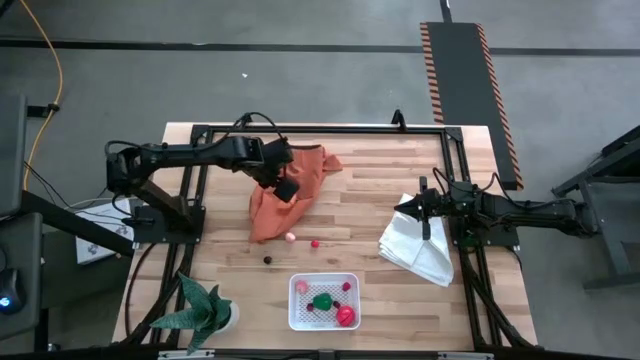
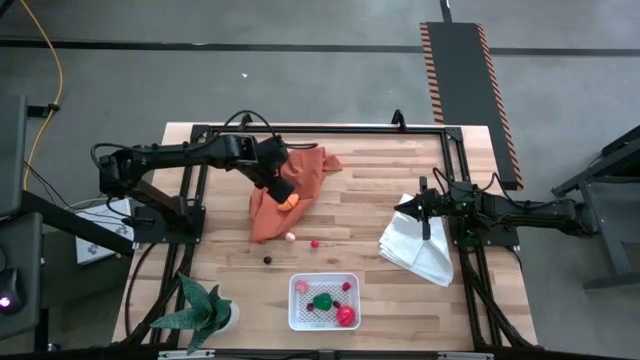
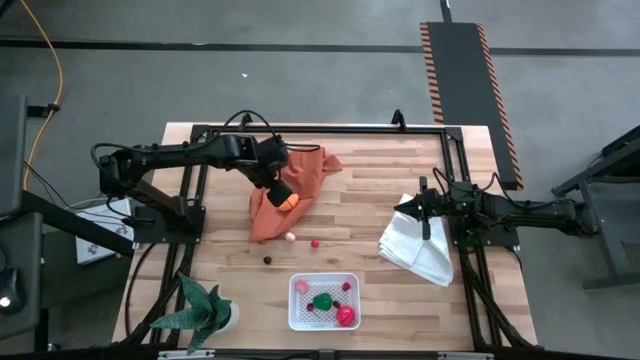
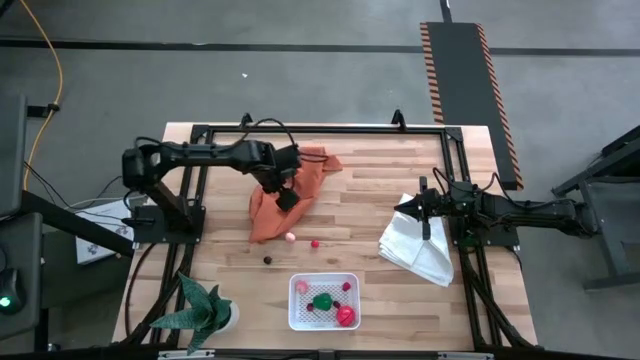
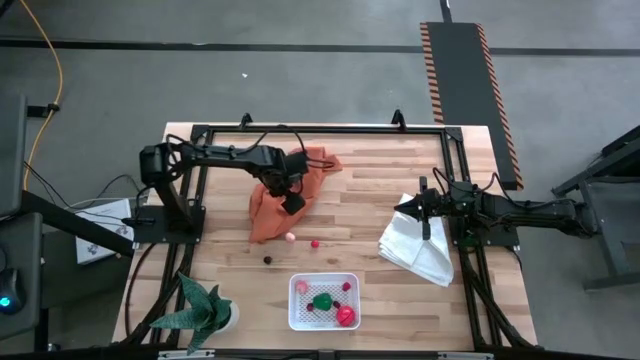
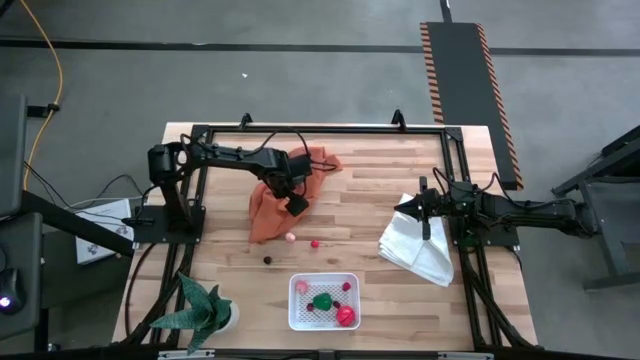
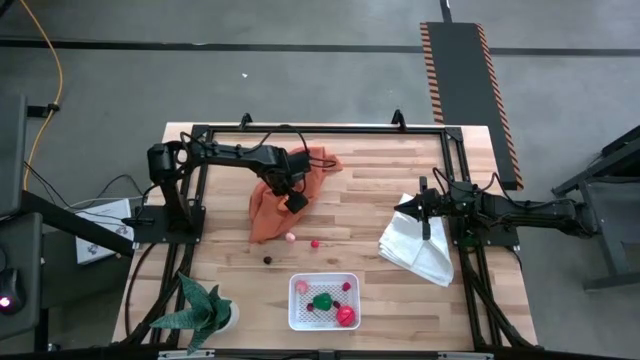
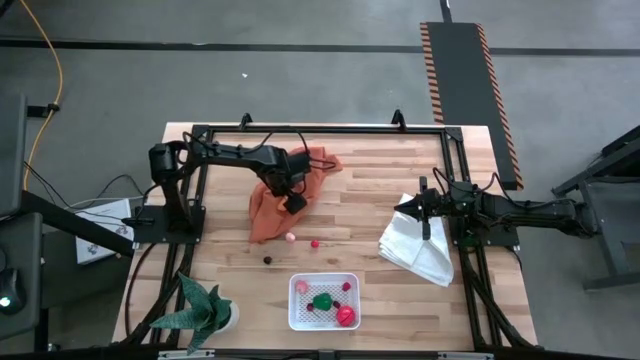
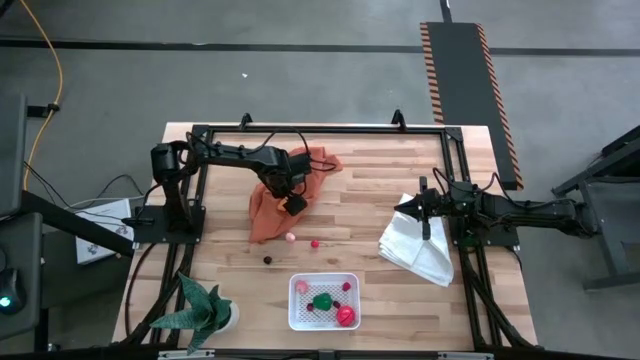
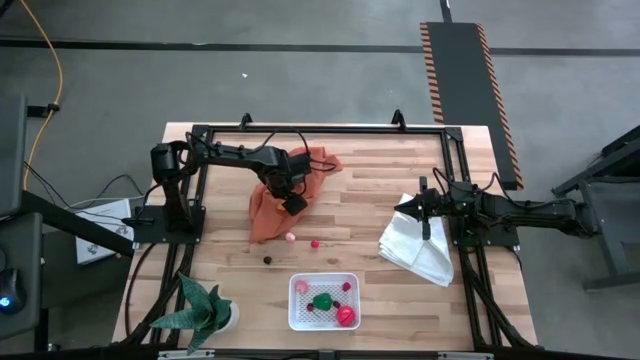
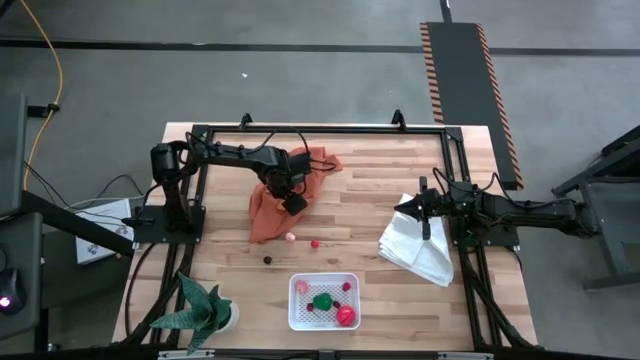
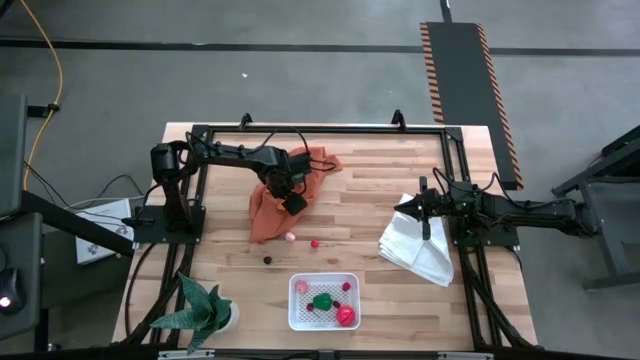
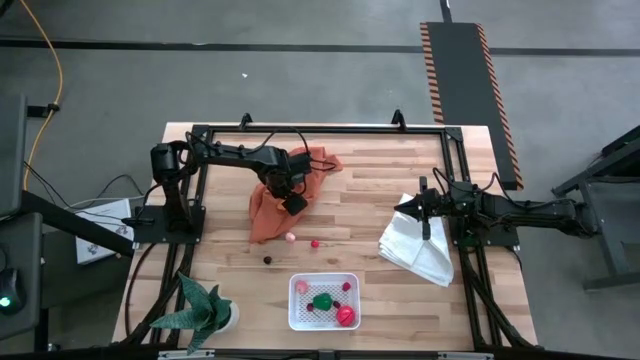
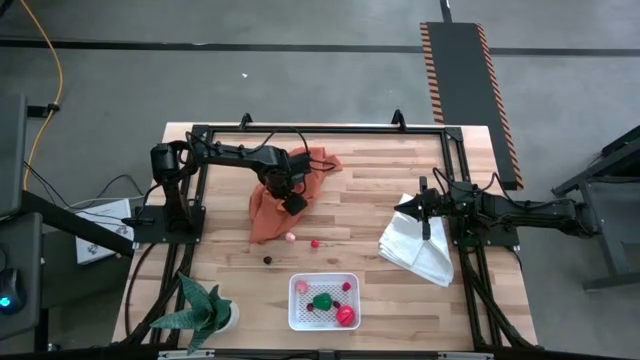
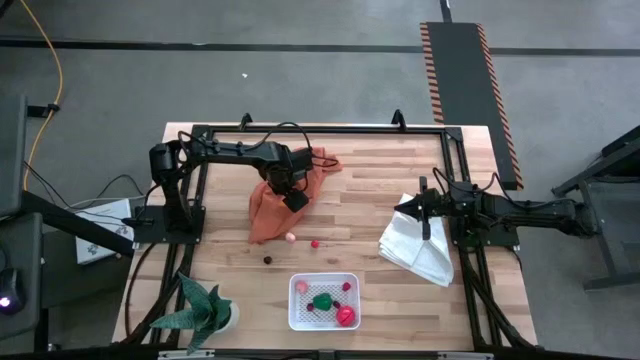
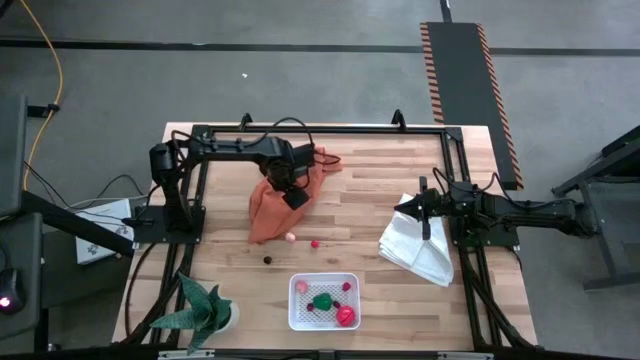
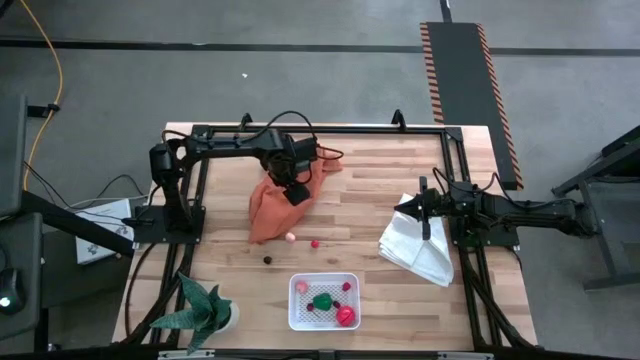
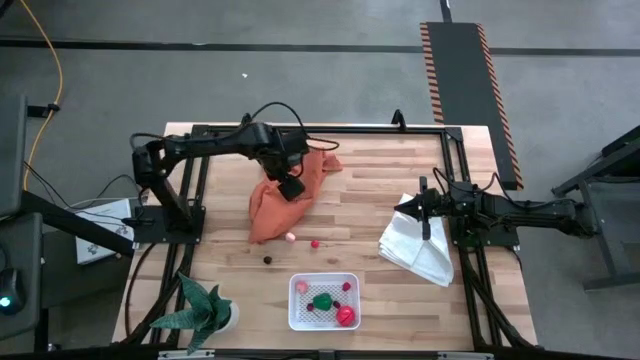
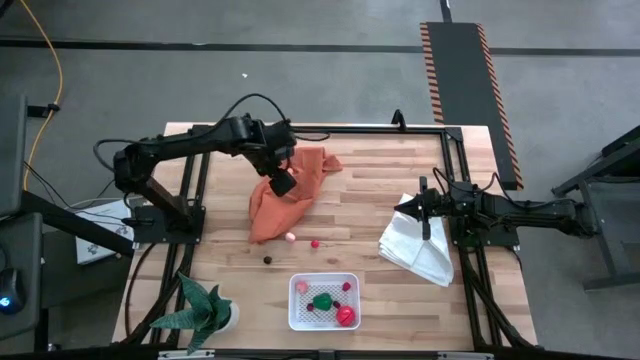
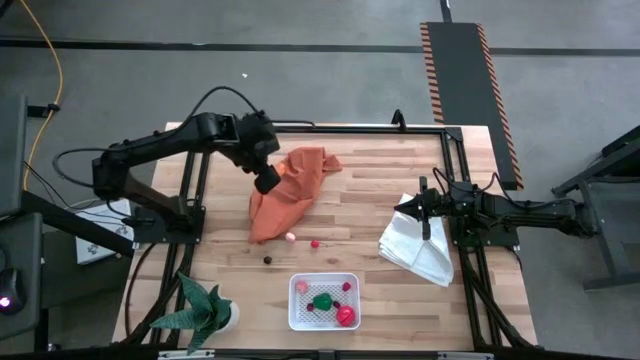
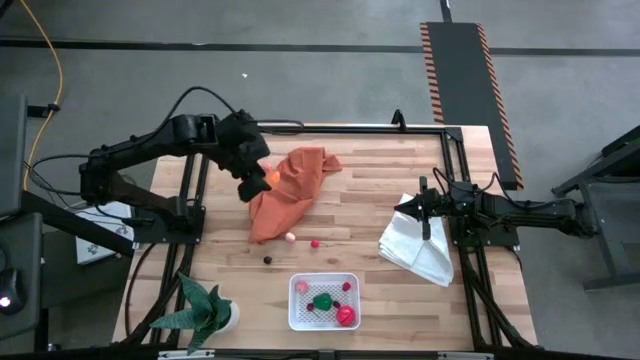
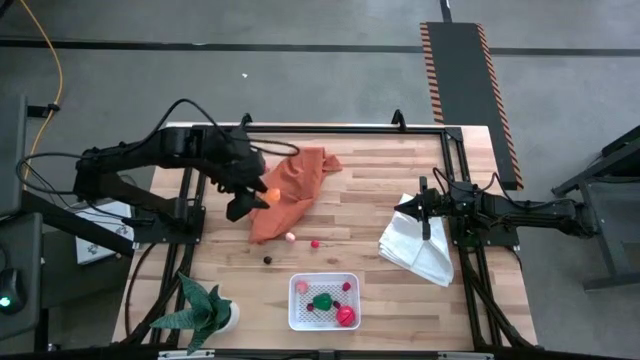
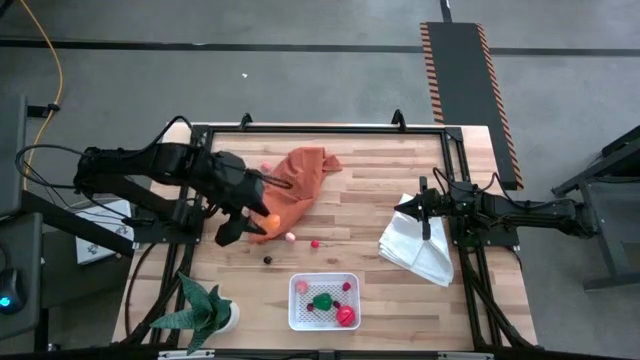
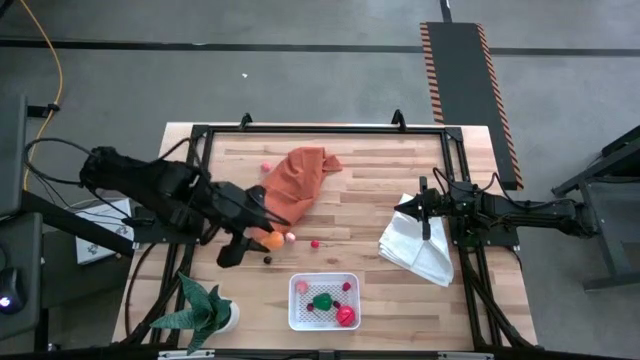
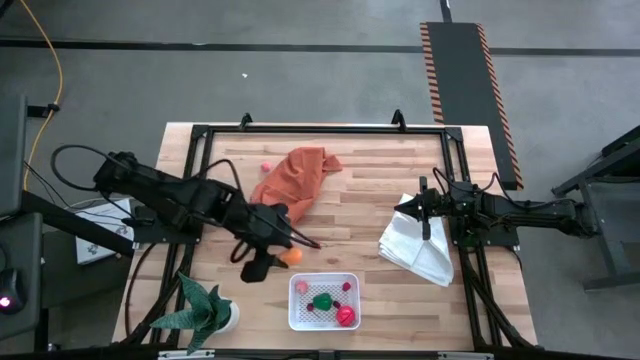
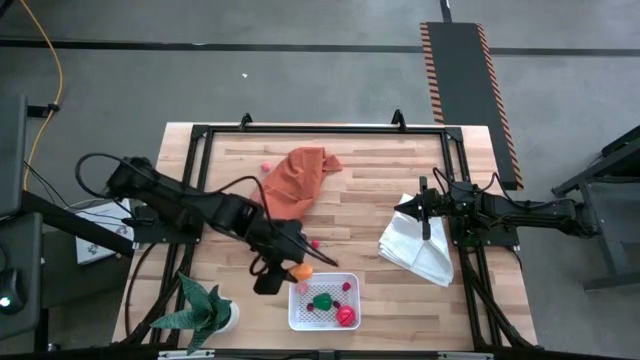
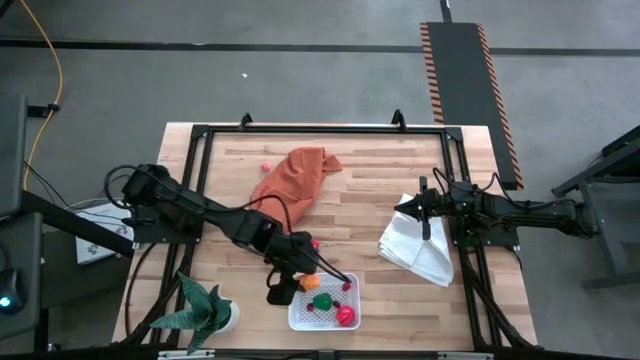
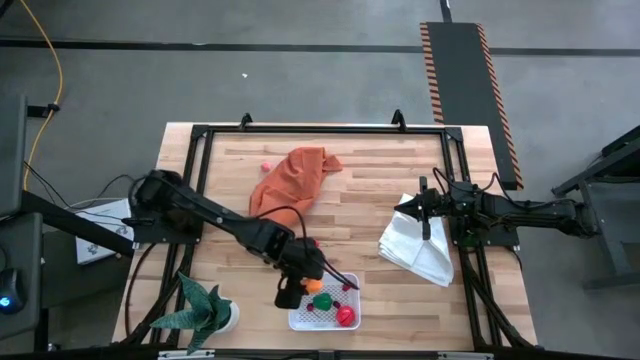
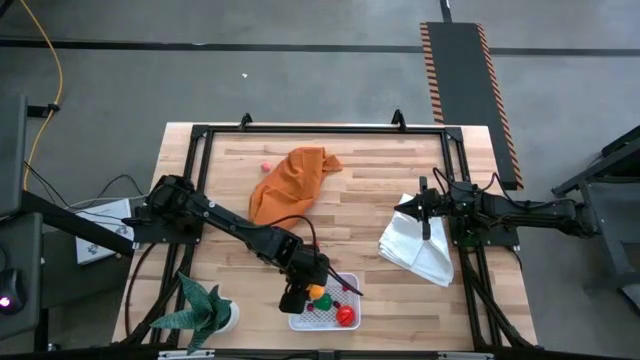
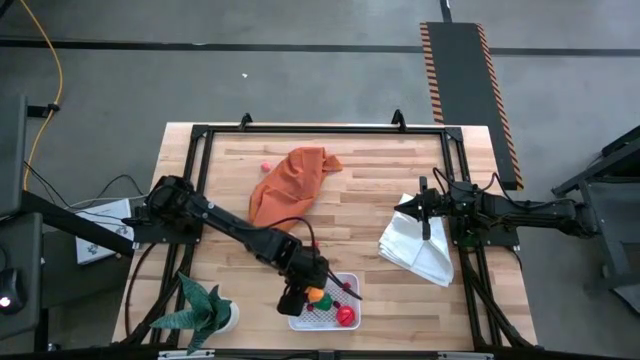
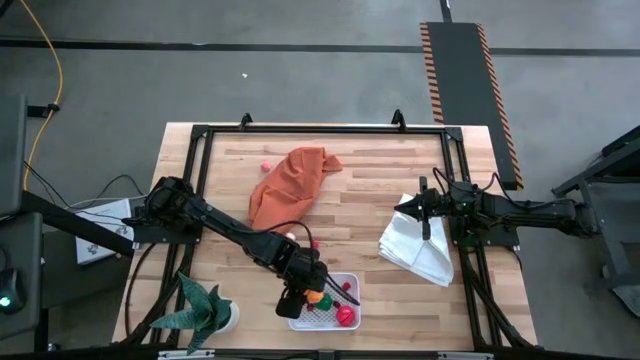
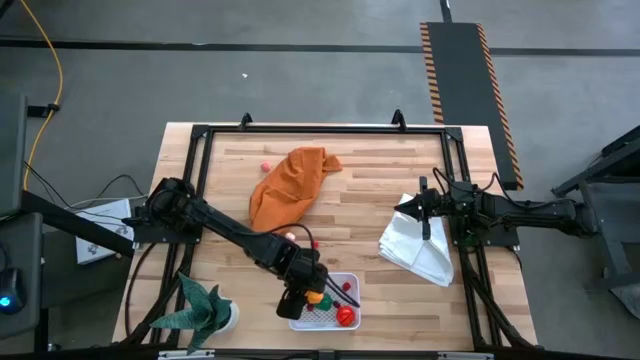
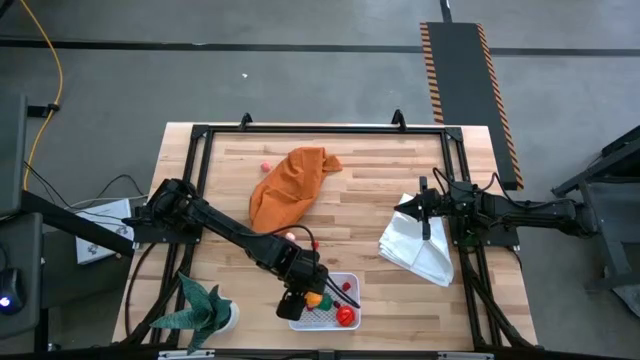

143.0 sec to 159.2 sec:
Task: Pick and placing Produce into tupperware
Put the yellow pumpkin into the white bin

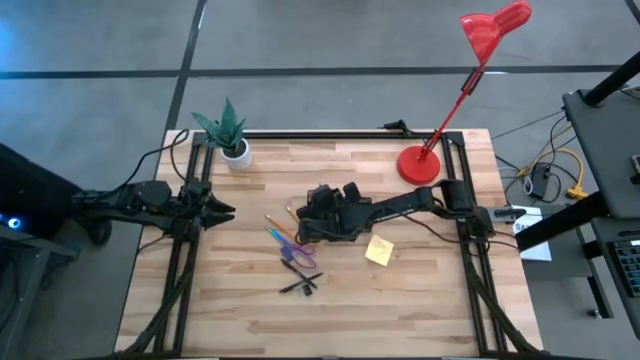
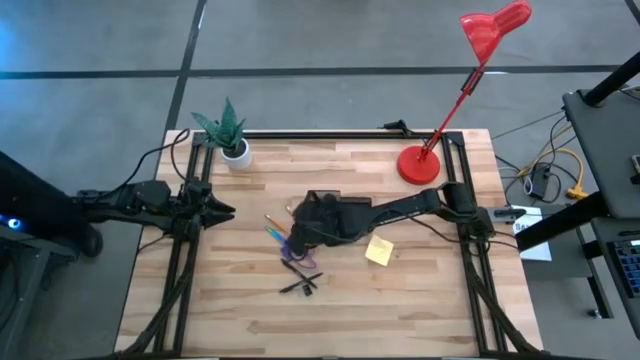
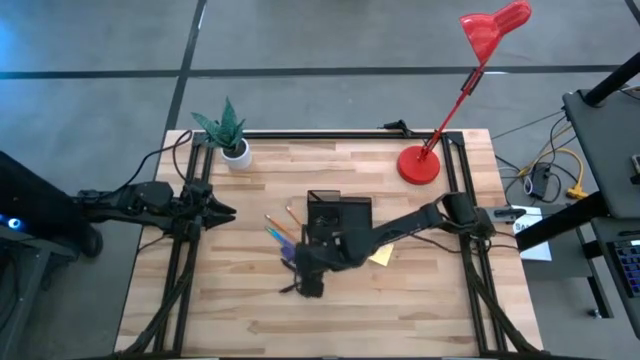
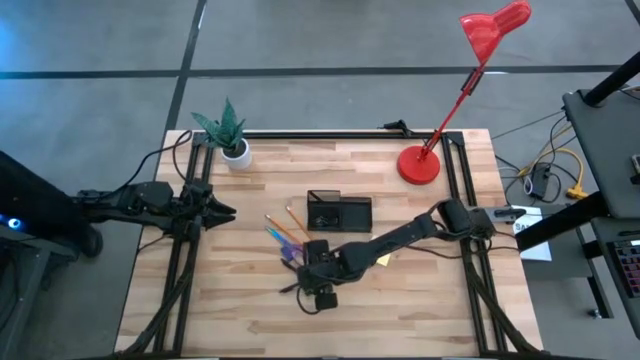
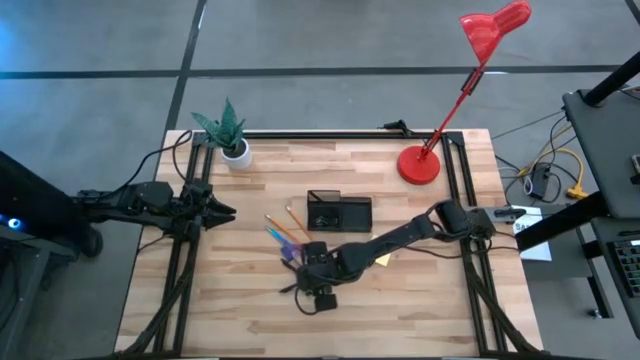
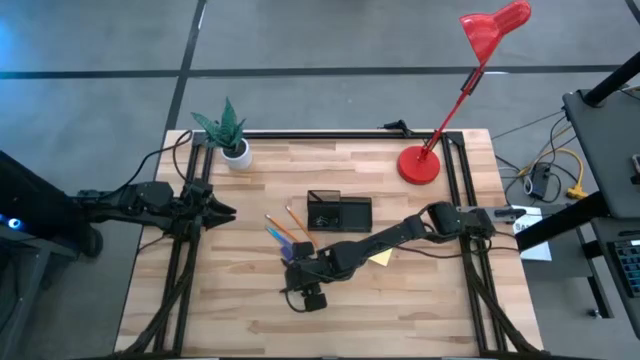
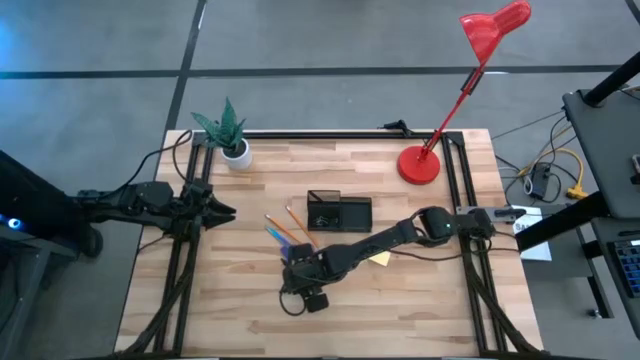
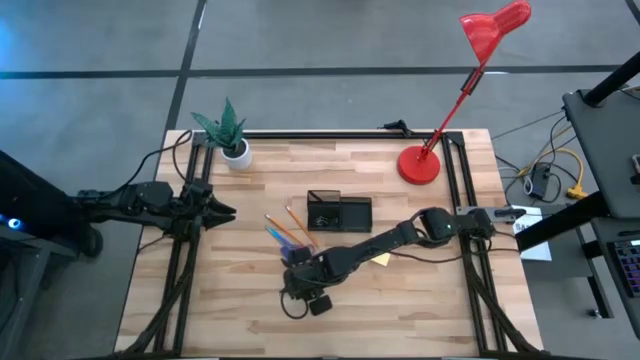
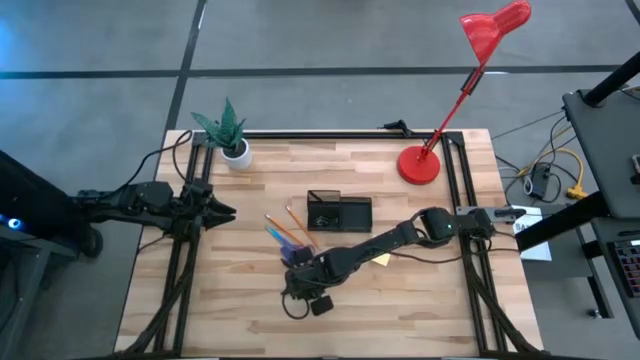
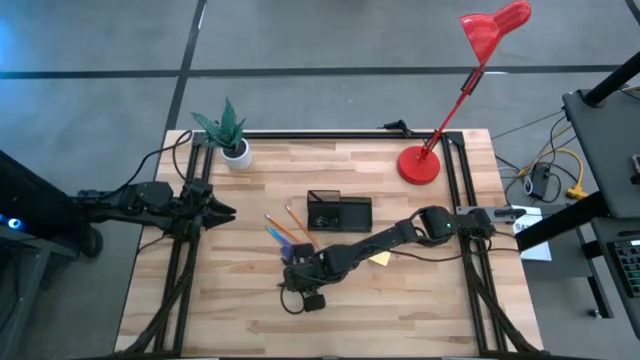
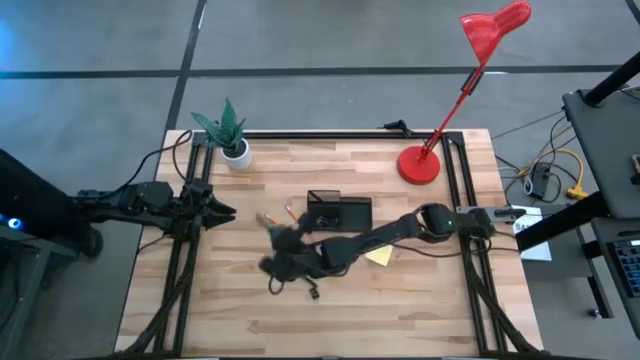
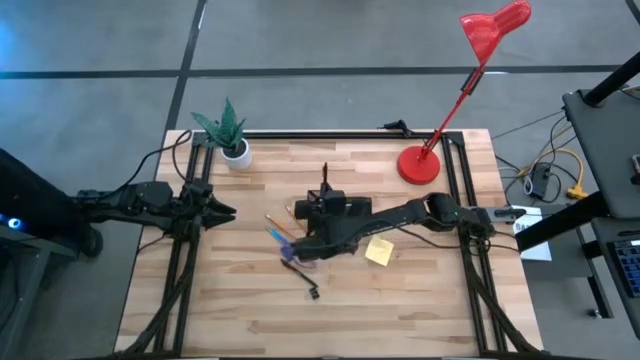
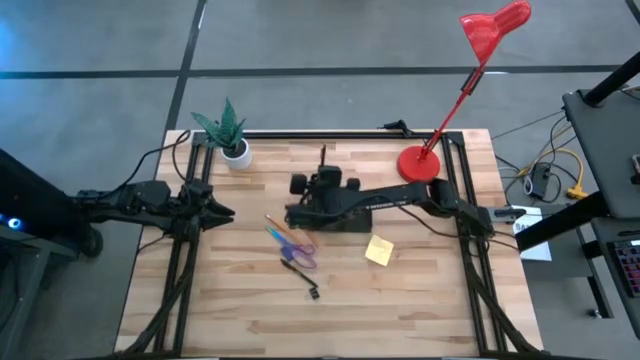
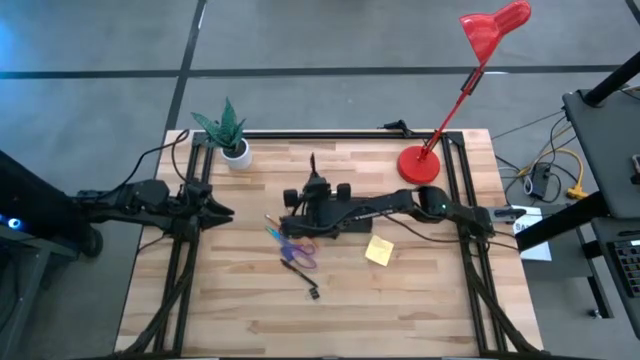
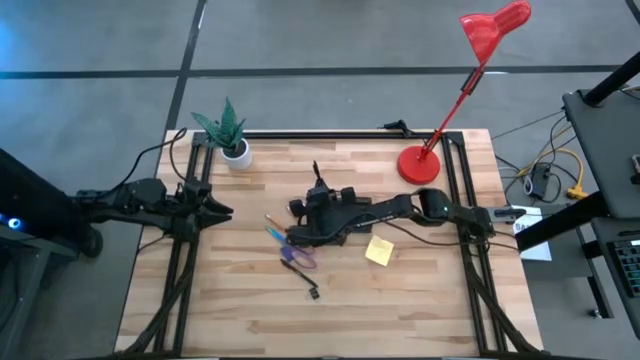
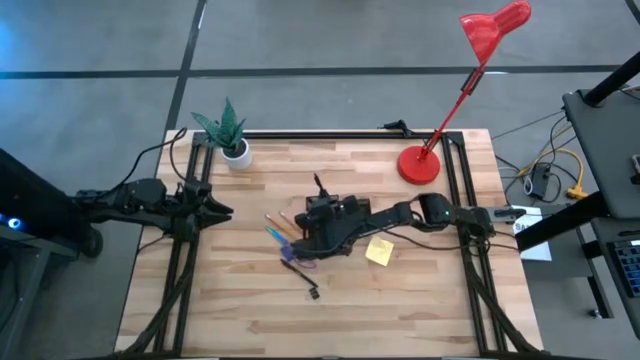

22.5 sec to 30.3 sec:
Task: Pick and place office supplies into organizer
Put the bottom black pen into the desk organizer
